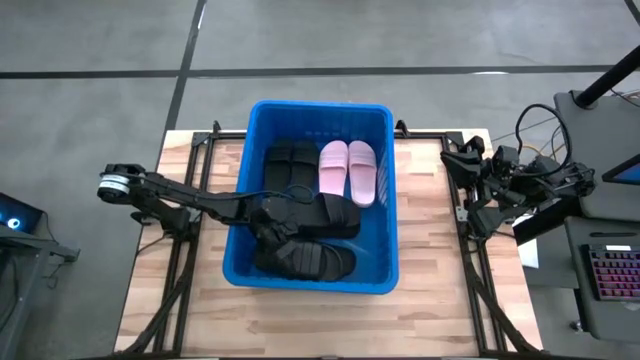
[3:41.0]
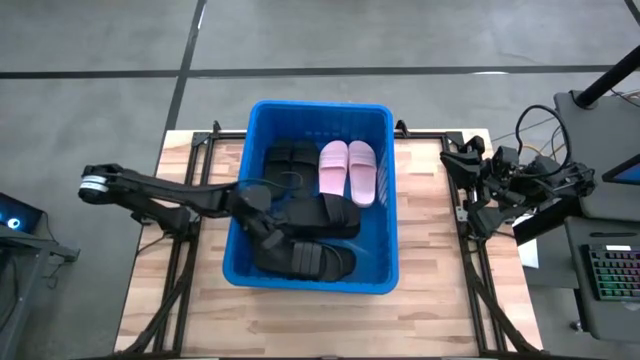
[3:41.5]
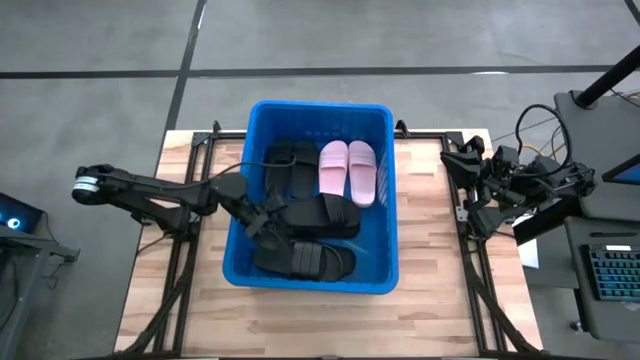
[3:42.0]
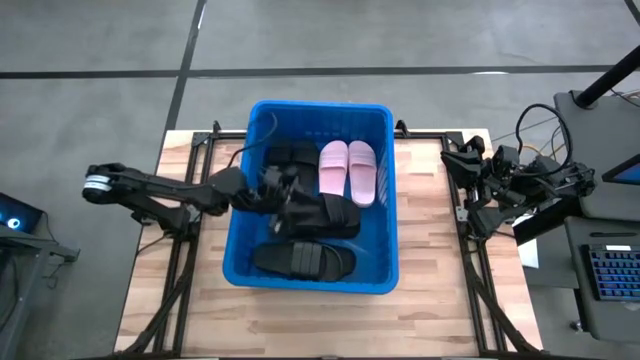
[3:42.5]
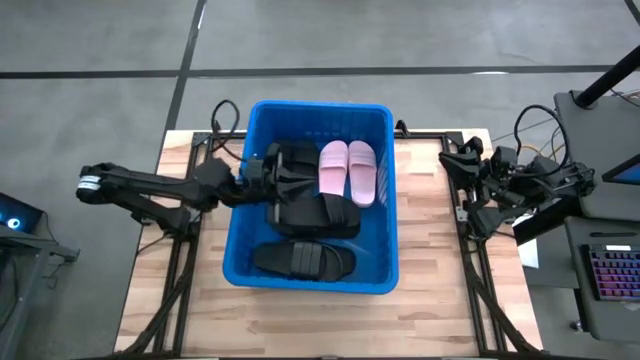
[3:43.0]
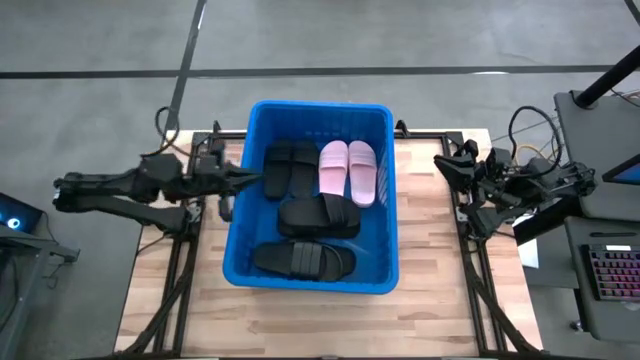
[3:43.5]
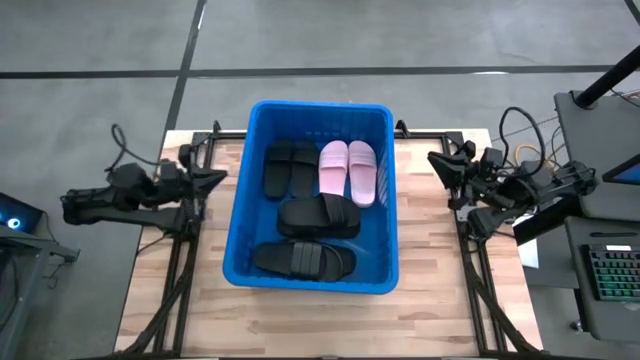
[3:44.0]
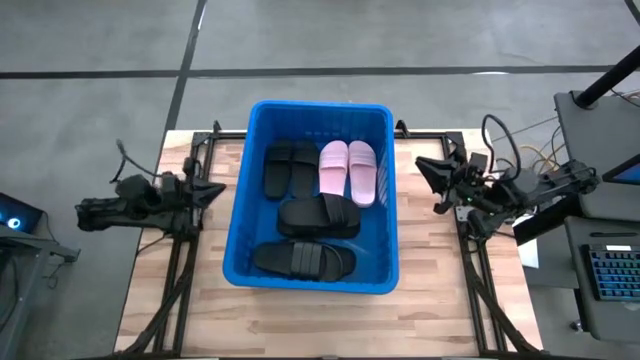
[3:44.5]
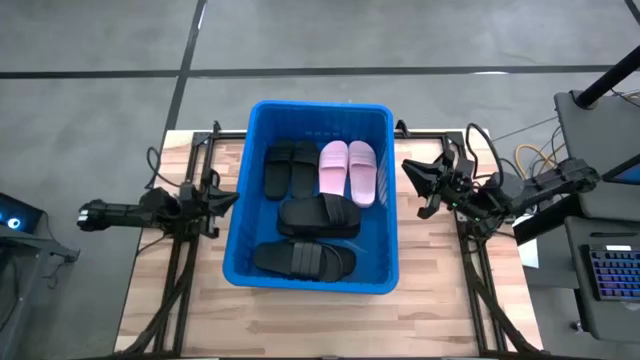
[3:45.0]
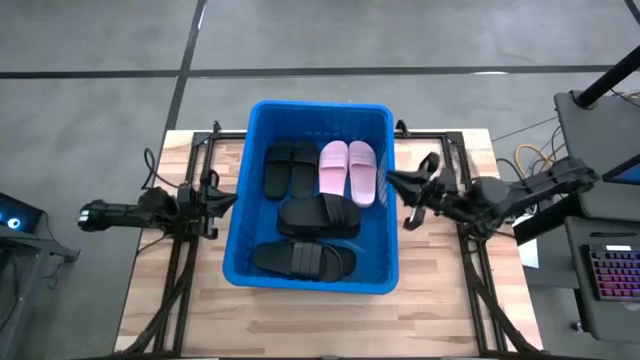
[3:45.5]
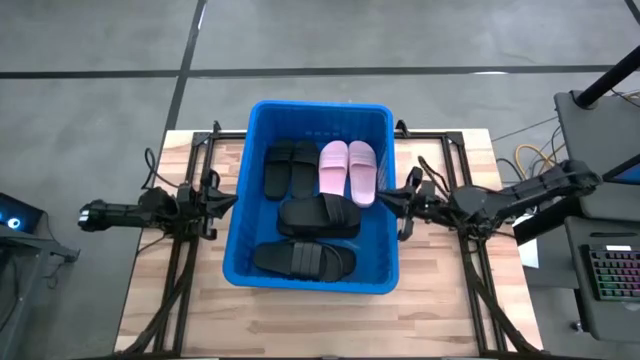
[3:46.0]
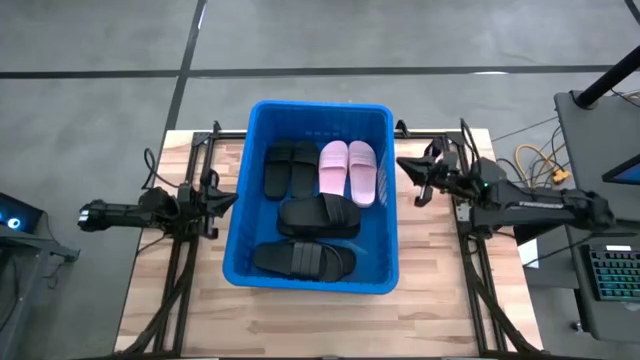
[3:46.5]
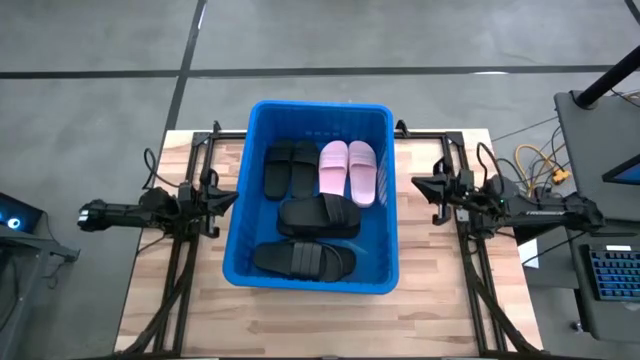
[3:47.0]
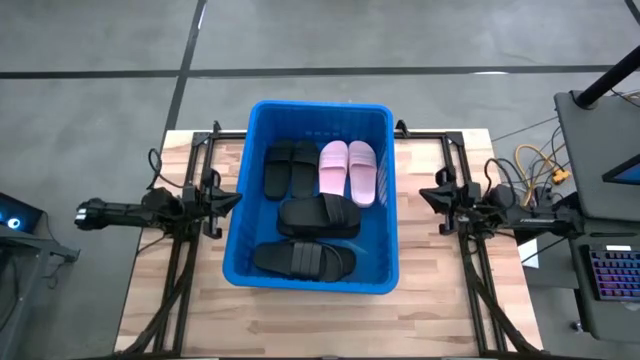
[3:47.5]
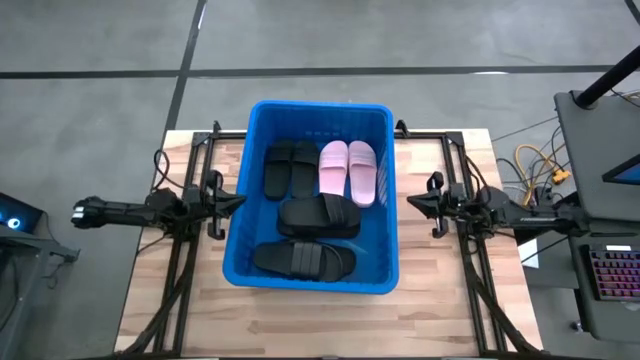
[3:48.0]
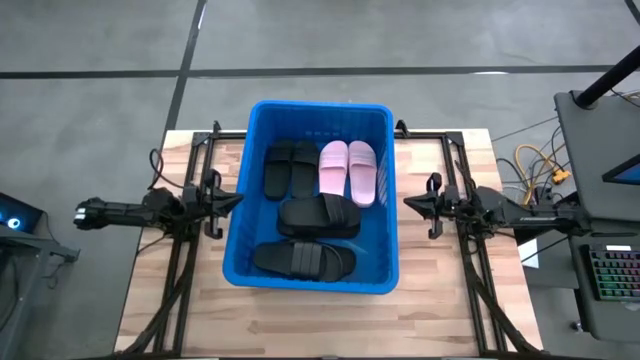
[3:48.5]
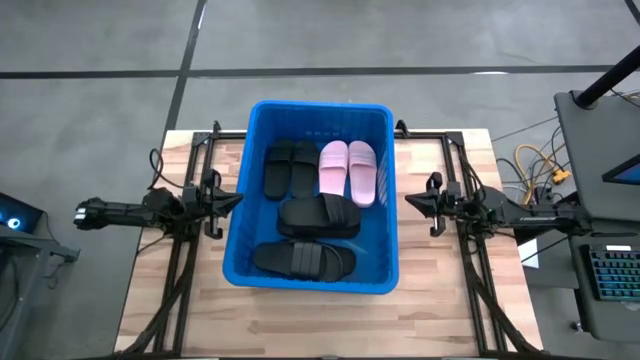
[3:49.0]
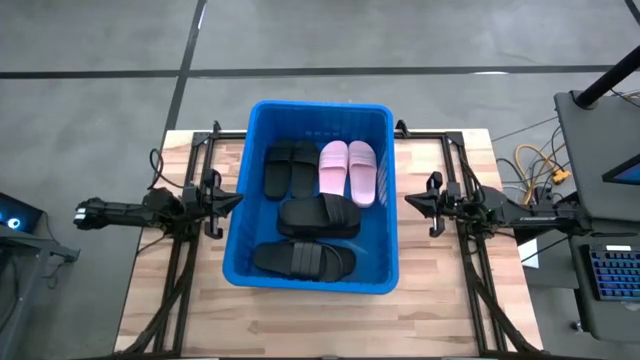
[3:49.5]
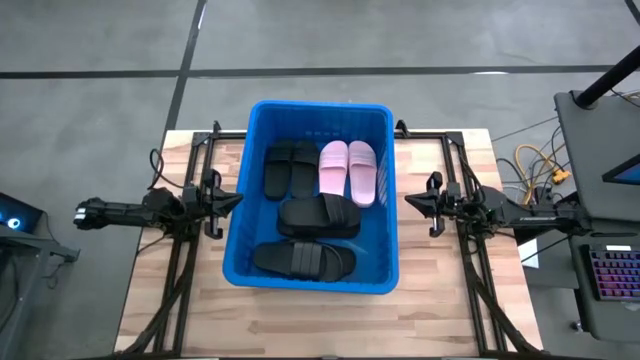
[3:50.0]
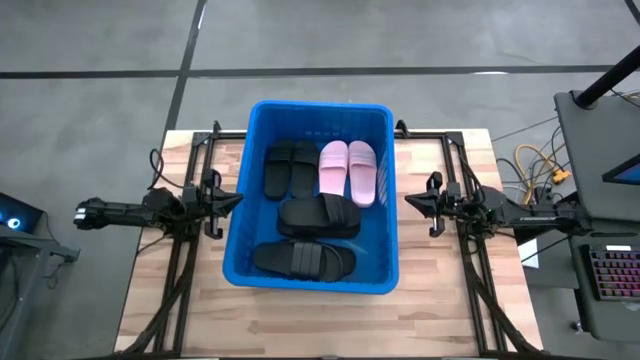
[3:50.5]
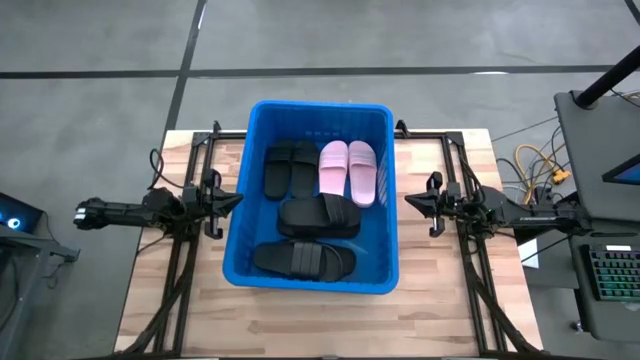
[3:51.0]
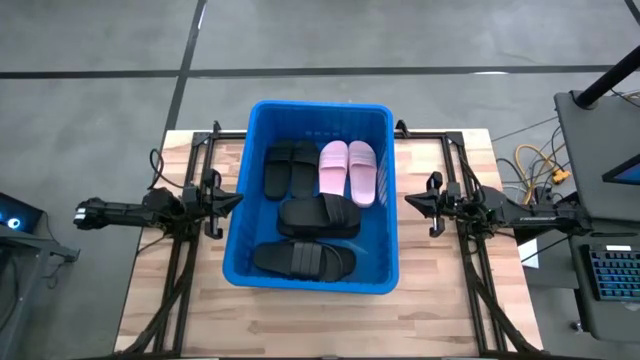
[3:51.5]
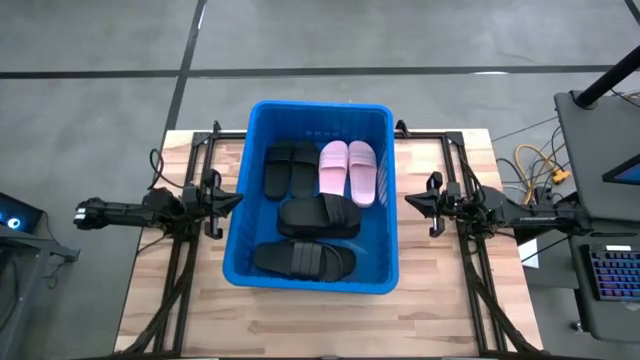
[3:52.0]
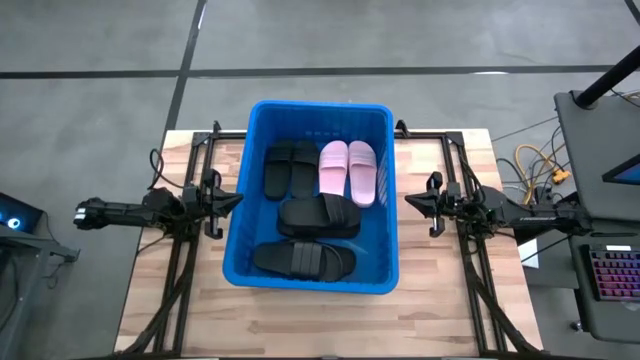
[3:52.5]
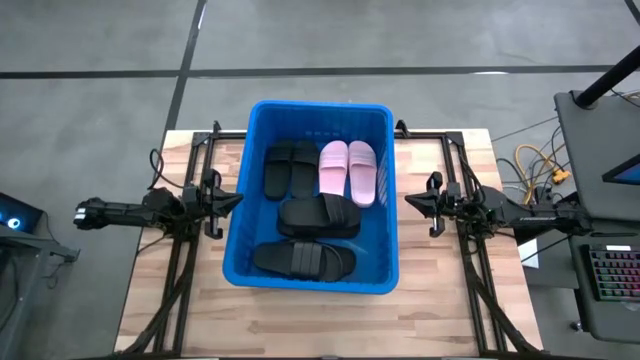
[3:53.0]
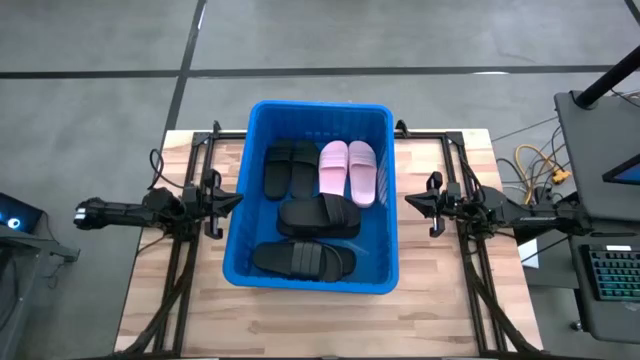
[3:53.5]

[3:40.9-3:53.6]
Task: Pick and place slides into bin
Return to Home Position

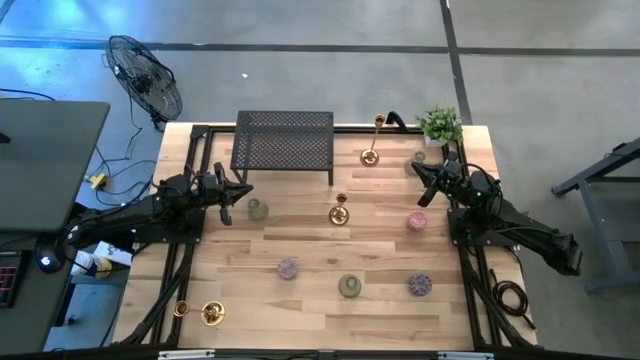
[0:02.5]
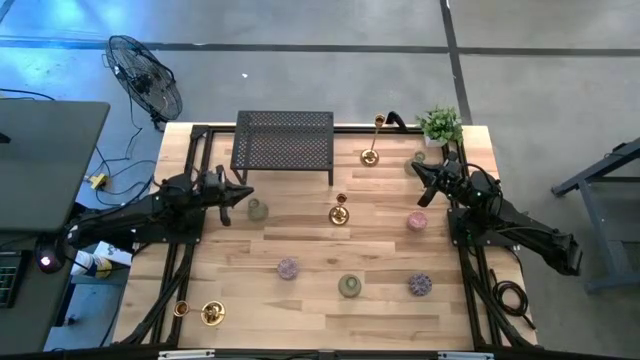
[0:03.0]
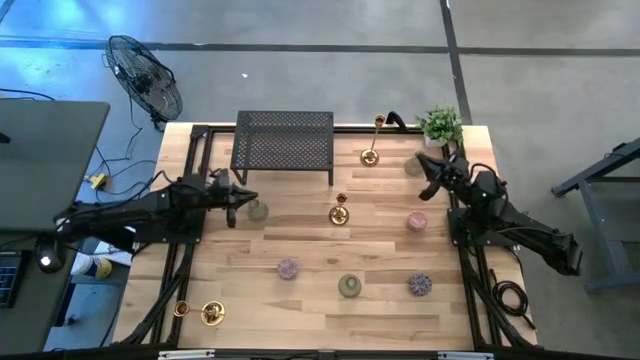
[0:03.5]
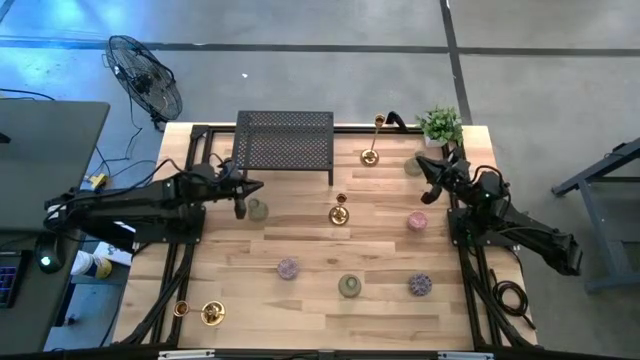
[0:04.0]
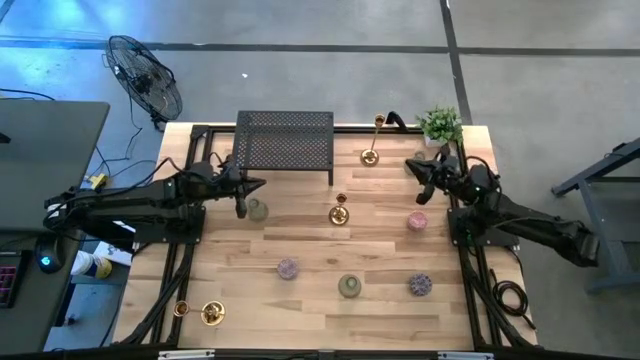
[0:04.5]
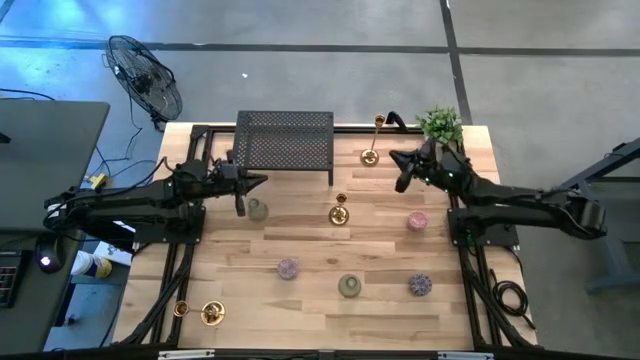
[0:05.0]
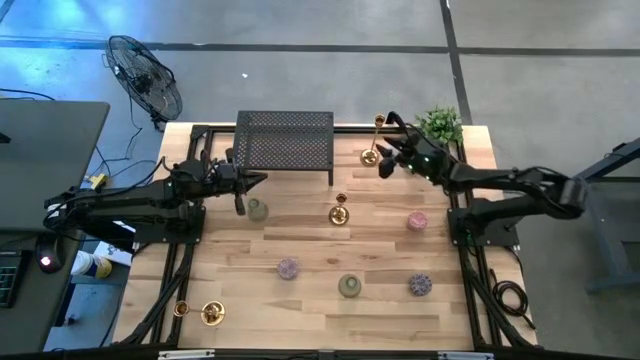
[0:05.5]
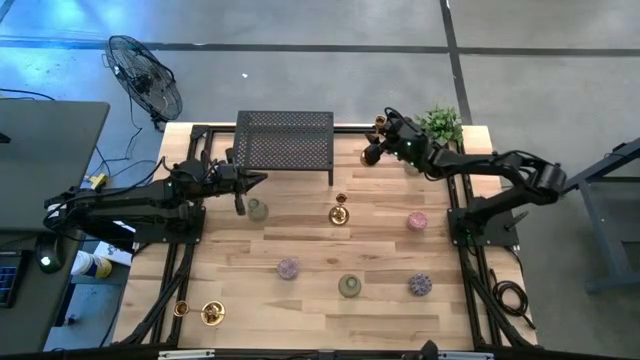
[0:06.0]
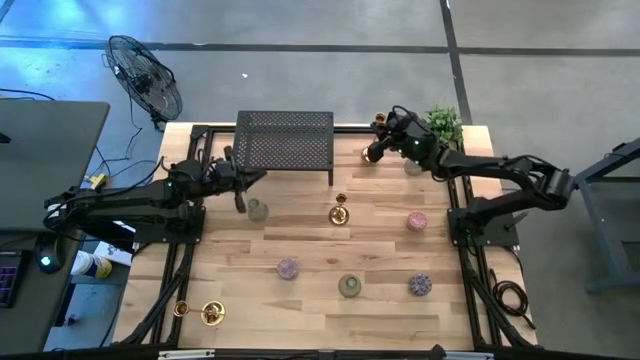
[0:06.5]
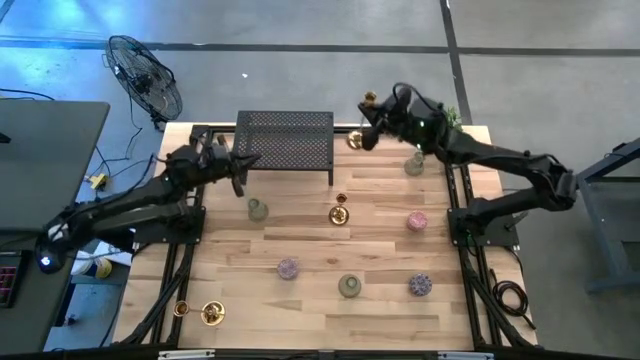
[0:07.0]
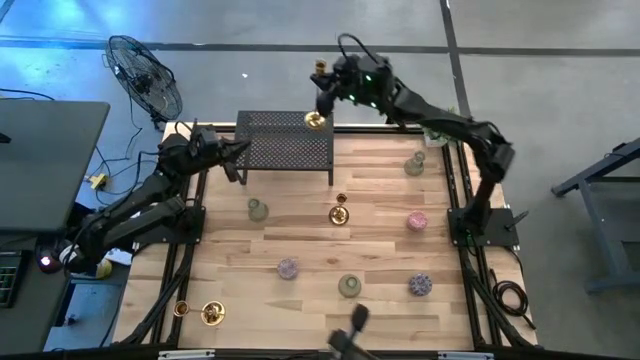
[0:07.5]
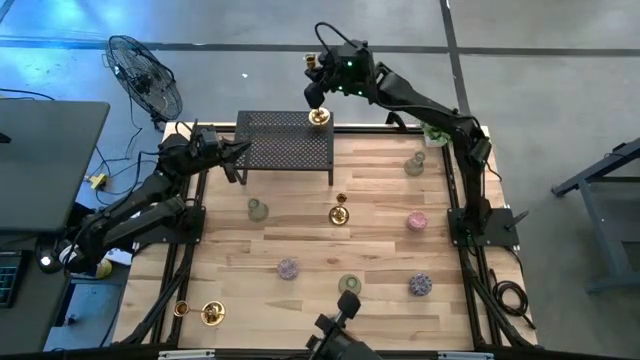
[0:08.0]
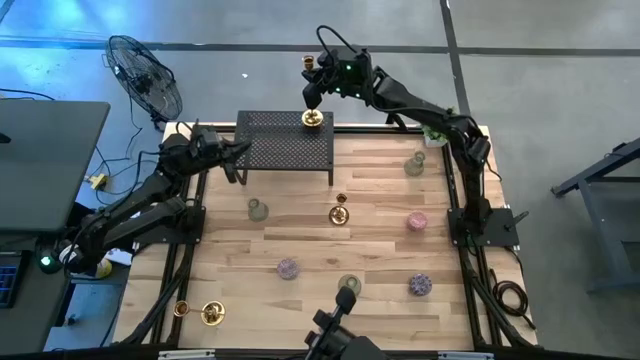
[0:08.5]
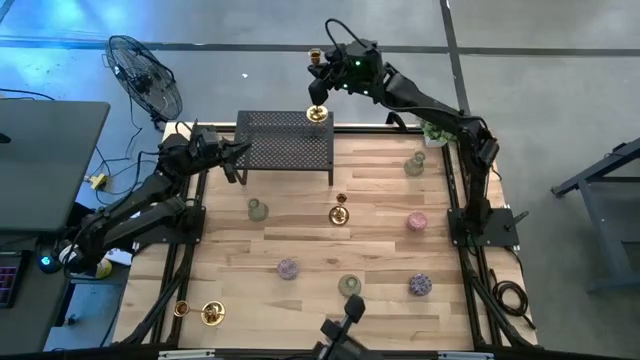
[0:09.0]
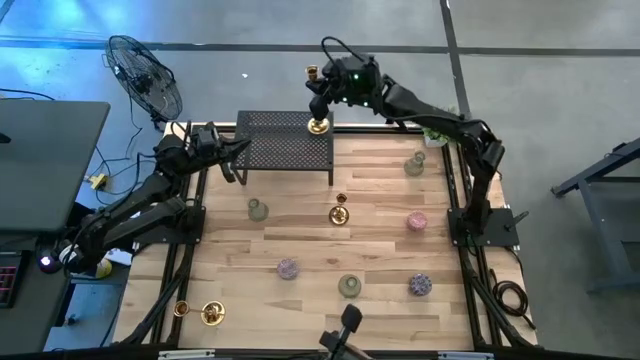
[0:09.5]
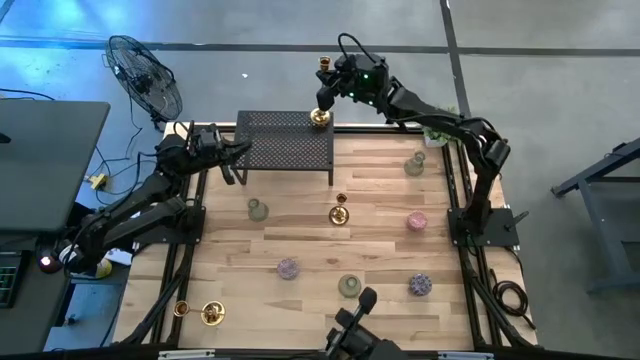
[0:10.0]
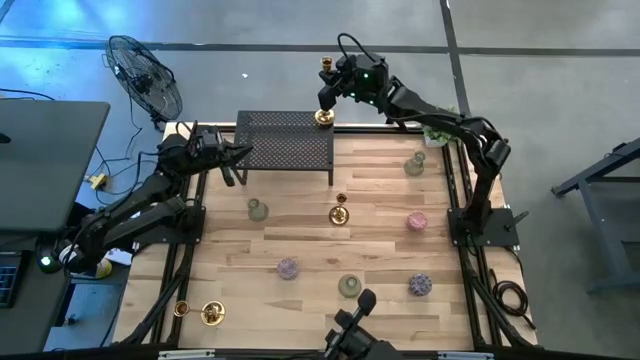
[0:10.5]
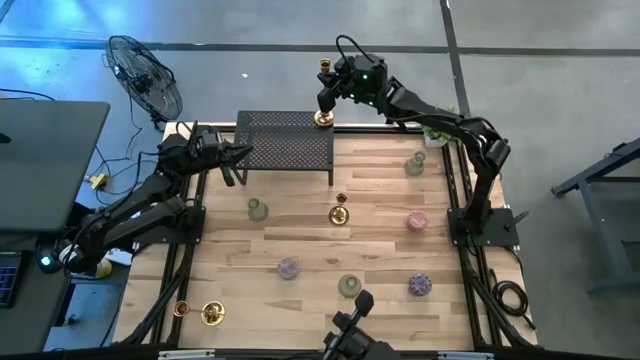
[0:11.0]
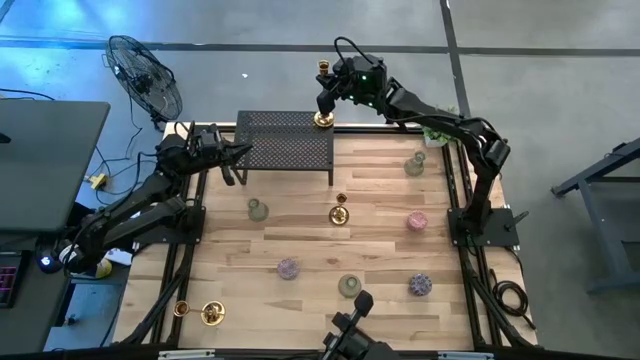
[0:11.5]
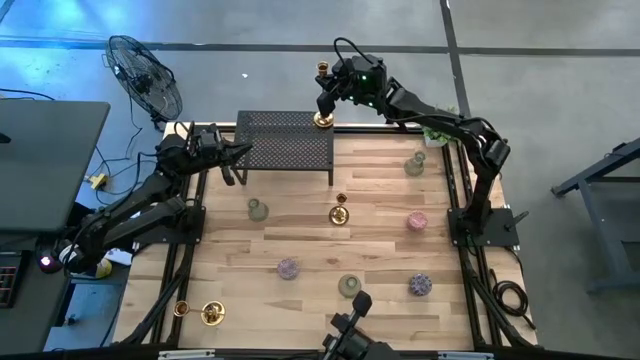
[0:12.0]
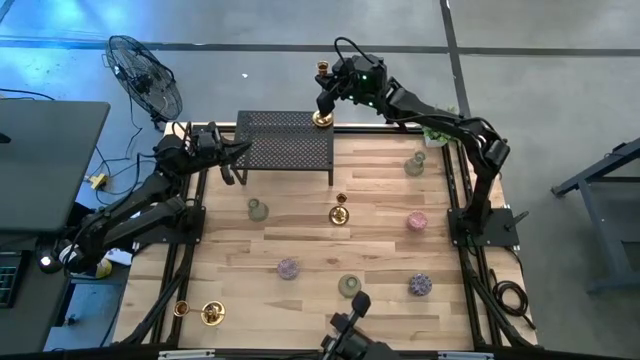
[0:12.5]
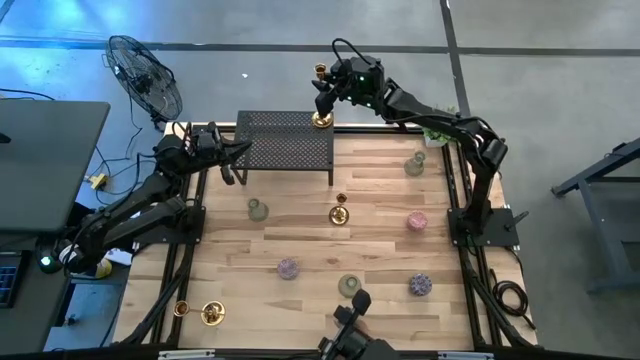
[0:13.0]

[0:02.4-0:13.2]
Task: Pick & Place candle stick holders
Put the top gold candle holder on the shelf
